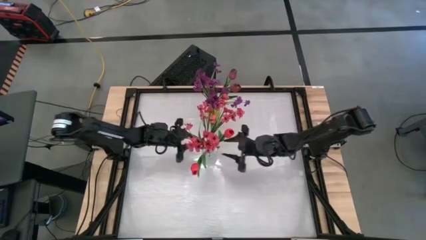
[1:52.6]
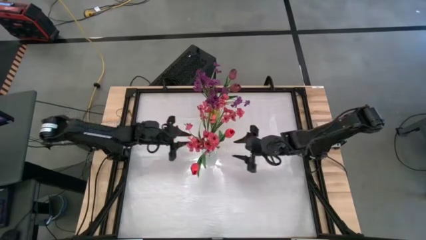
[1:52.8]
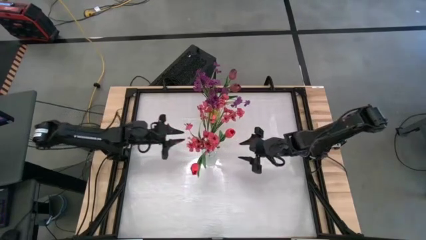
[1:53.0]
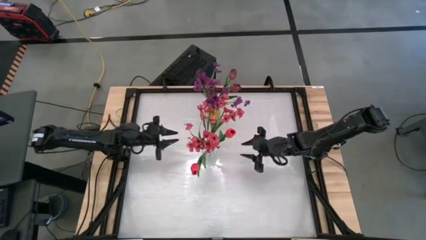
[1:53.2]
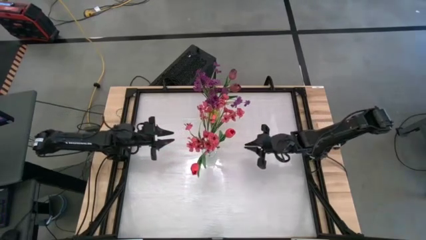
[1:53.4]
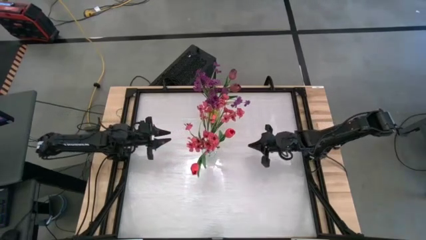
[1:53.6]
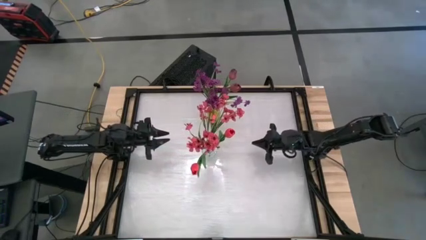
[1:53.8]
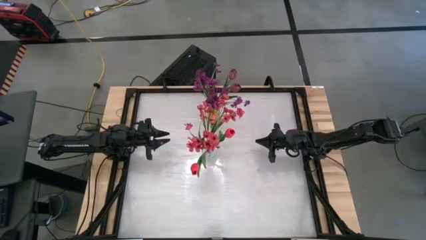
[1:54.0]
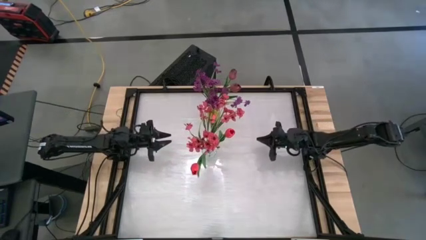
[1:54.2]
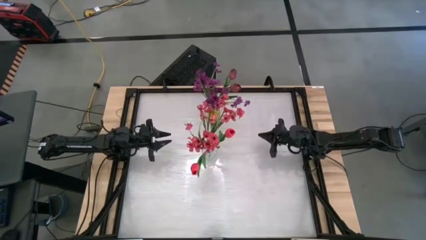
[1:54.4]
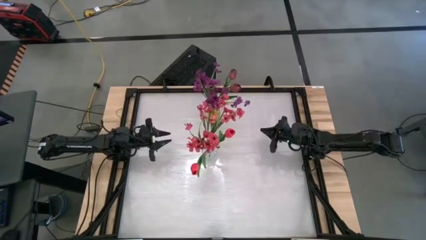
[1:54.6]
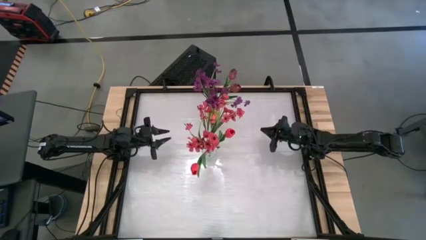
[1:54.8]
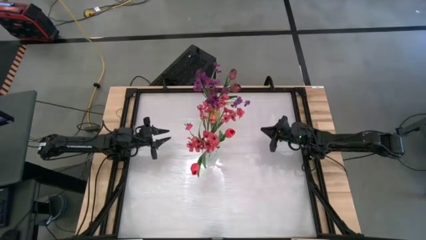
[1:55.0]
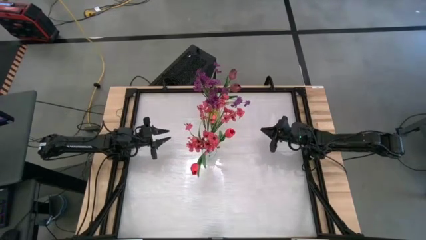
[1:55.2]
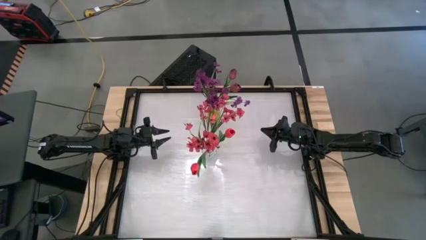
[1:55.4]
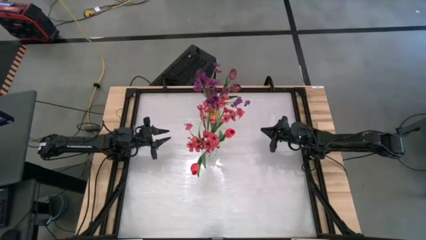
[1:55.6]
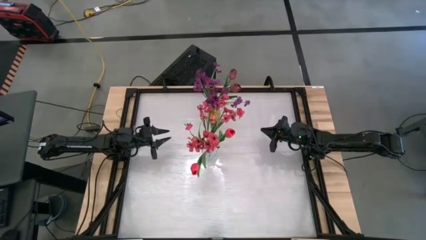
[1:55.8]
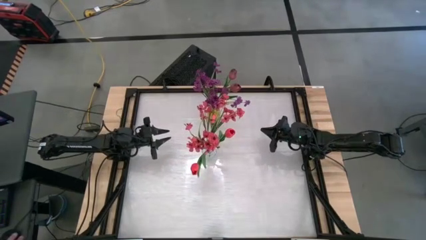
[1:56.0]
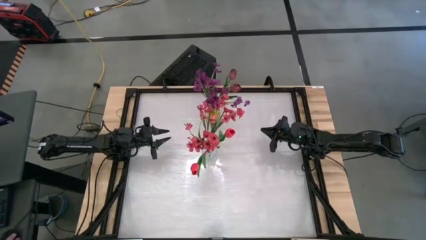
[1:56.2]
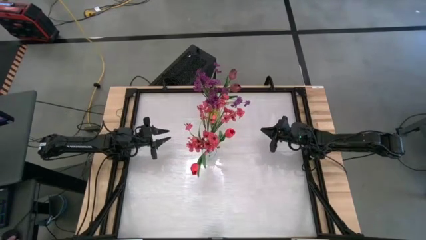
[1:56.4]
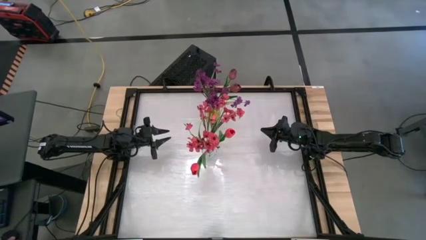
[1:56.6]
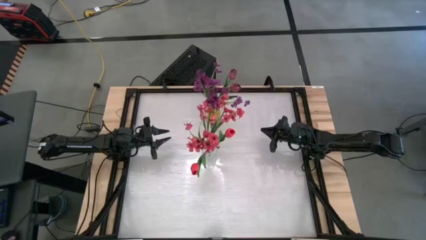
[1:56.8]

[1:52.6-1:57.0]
Task: Sort flowers into vase by color
Return to Home Position

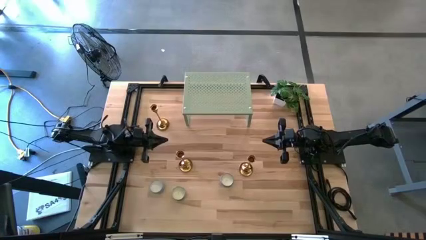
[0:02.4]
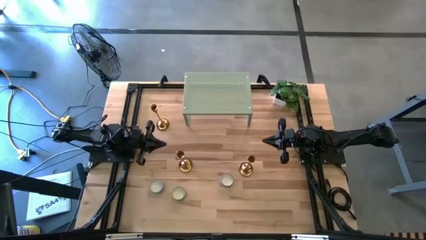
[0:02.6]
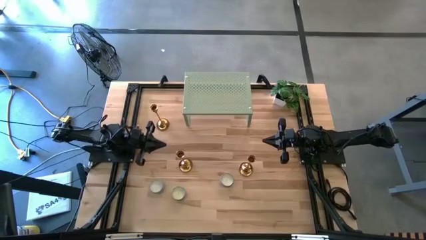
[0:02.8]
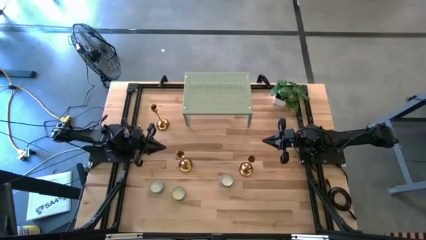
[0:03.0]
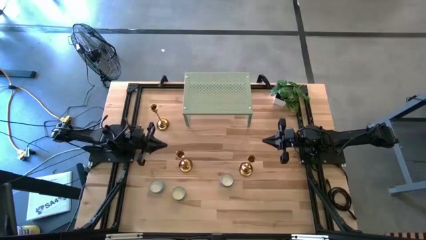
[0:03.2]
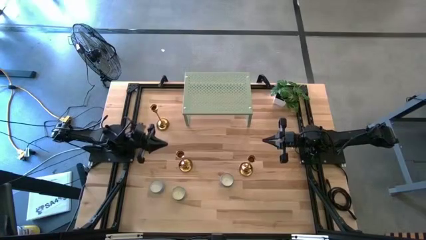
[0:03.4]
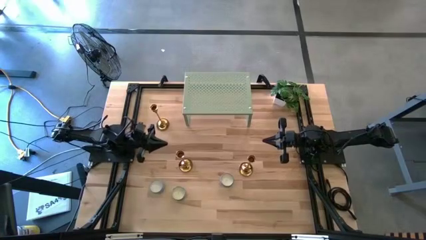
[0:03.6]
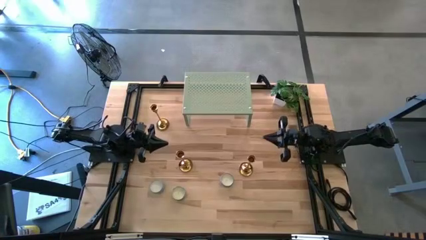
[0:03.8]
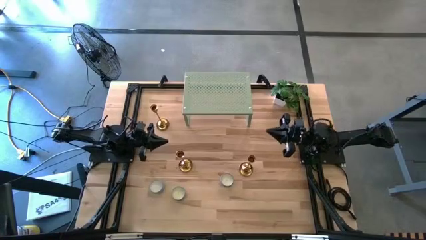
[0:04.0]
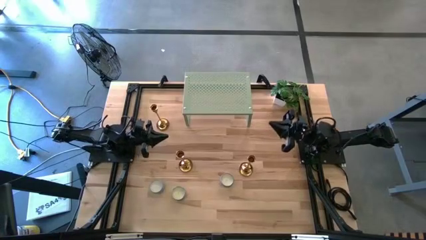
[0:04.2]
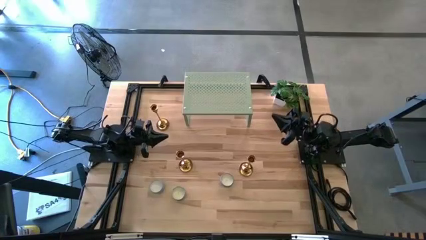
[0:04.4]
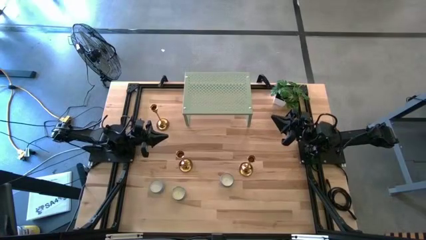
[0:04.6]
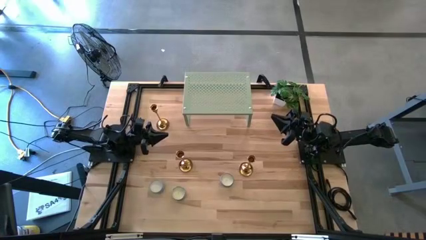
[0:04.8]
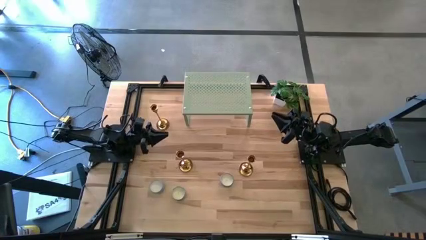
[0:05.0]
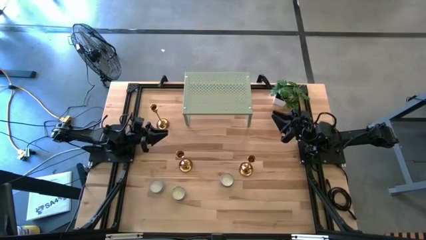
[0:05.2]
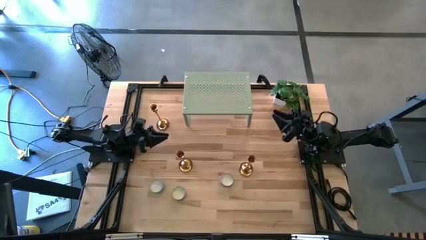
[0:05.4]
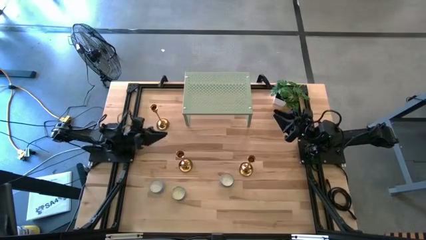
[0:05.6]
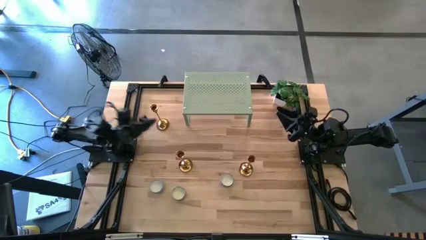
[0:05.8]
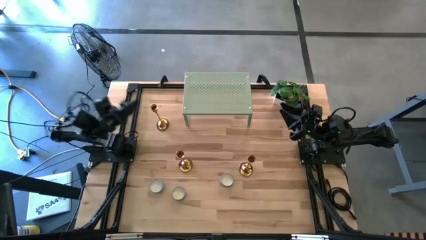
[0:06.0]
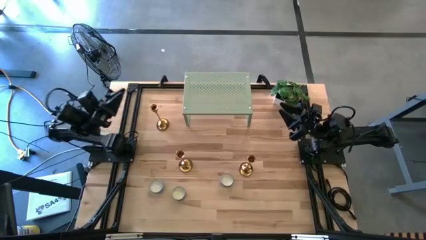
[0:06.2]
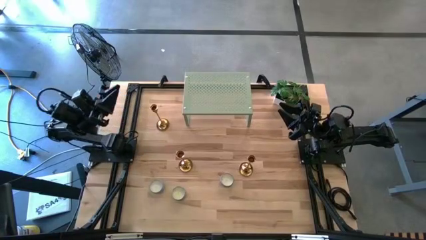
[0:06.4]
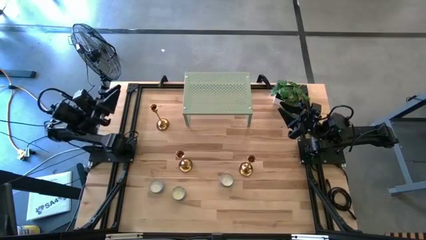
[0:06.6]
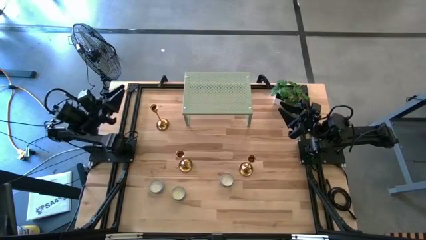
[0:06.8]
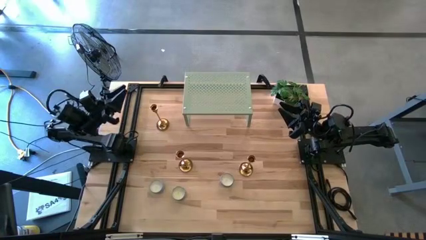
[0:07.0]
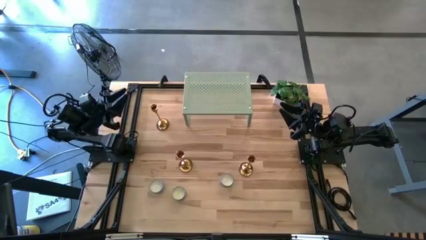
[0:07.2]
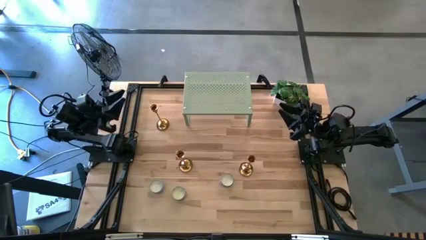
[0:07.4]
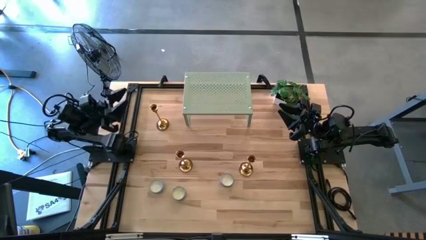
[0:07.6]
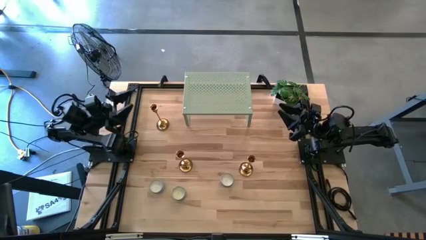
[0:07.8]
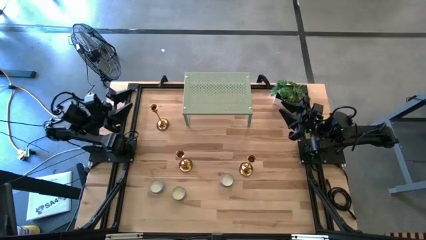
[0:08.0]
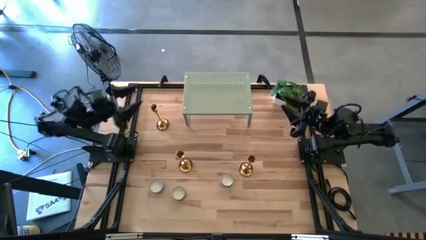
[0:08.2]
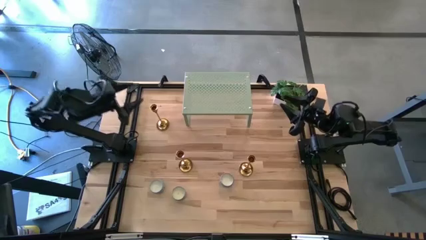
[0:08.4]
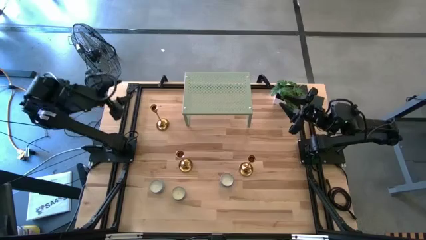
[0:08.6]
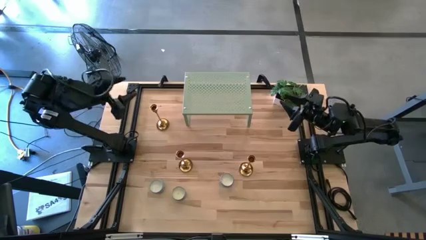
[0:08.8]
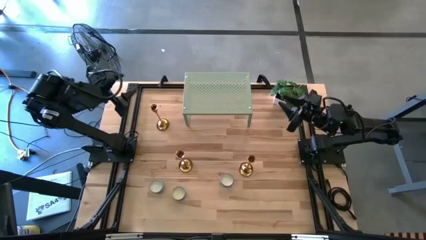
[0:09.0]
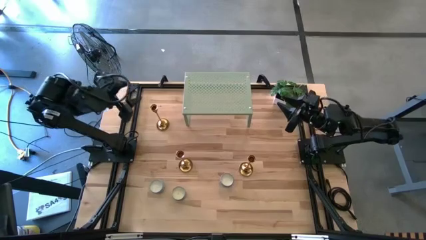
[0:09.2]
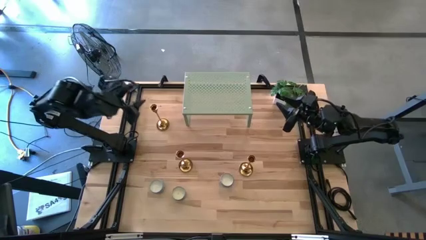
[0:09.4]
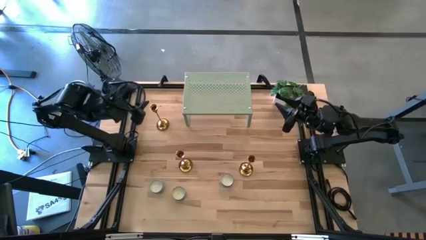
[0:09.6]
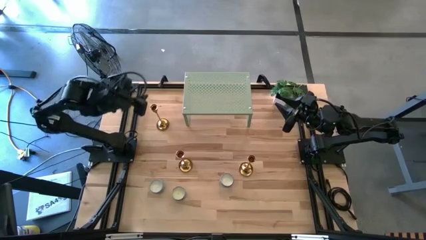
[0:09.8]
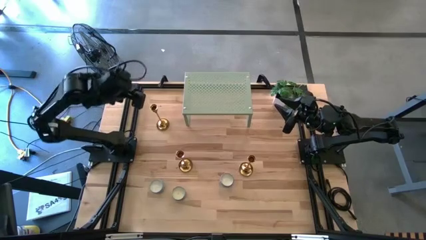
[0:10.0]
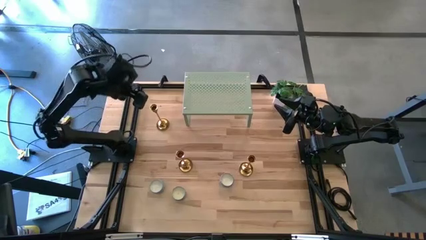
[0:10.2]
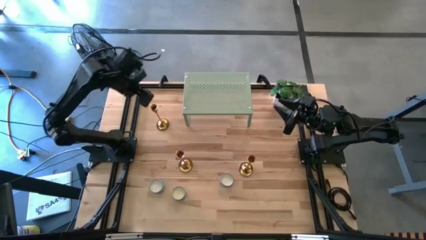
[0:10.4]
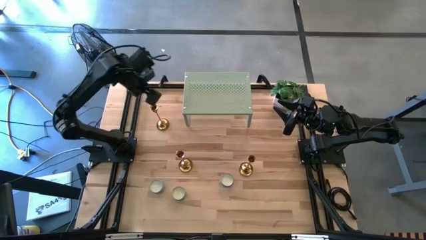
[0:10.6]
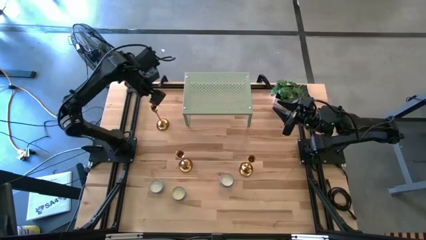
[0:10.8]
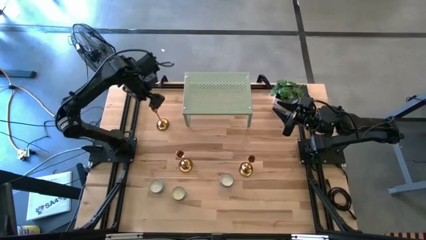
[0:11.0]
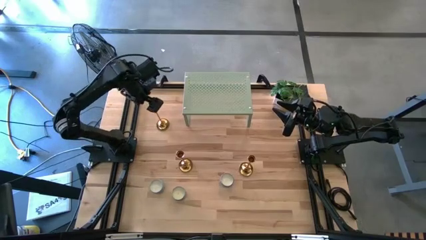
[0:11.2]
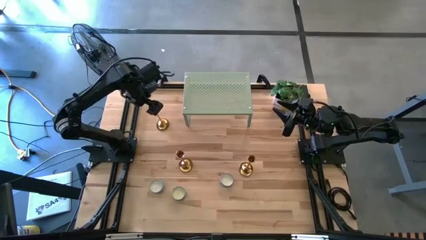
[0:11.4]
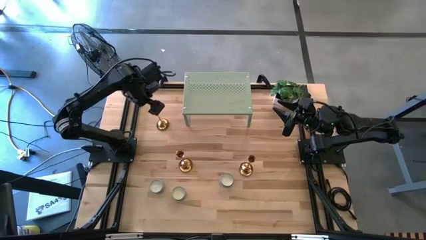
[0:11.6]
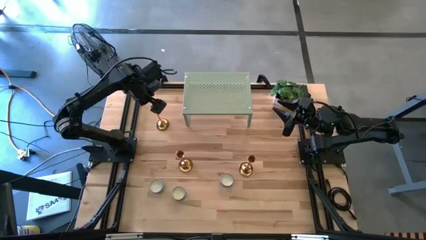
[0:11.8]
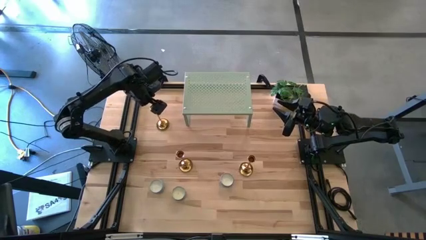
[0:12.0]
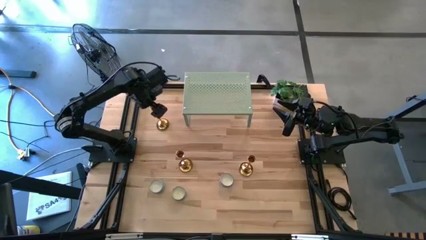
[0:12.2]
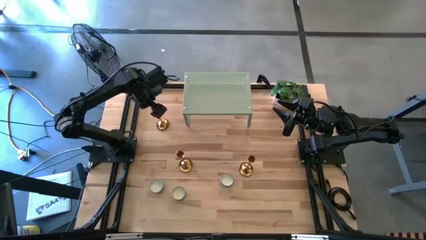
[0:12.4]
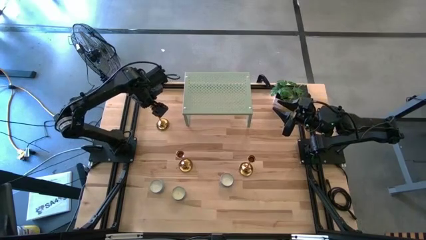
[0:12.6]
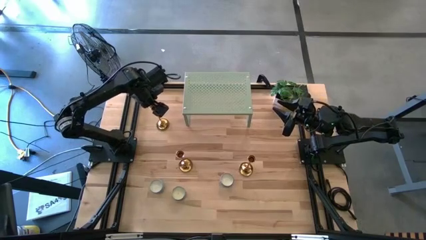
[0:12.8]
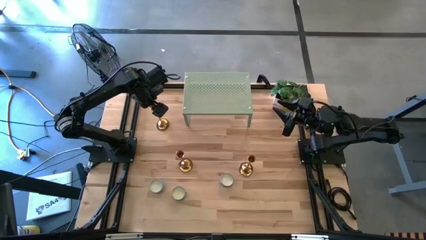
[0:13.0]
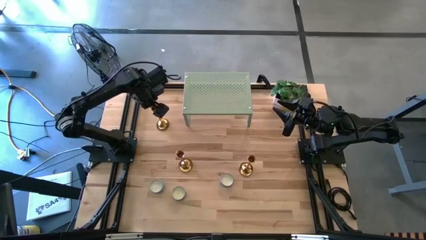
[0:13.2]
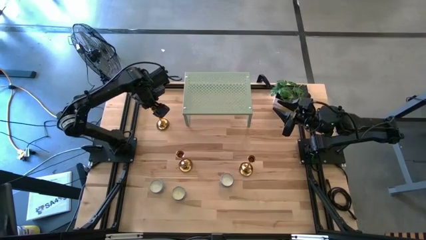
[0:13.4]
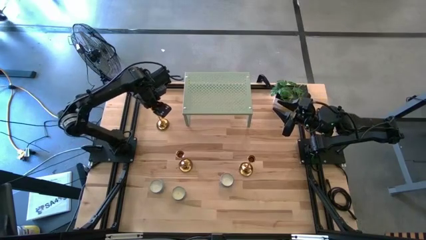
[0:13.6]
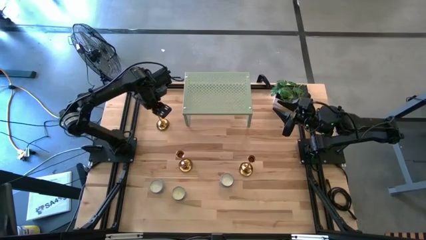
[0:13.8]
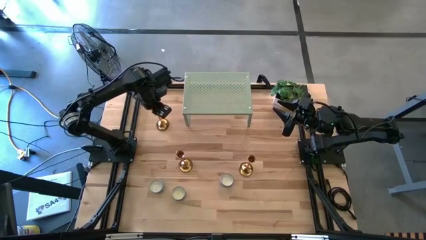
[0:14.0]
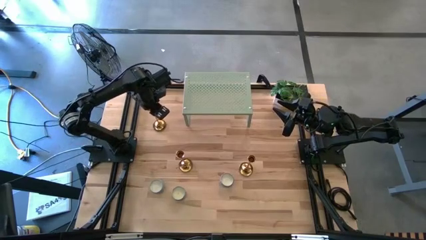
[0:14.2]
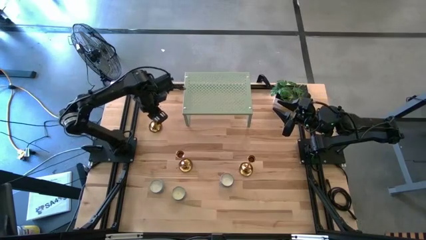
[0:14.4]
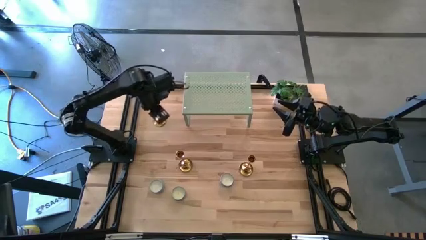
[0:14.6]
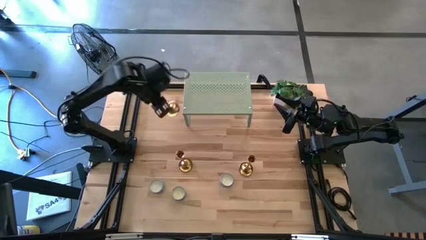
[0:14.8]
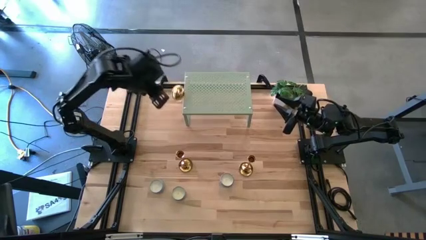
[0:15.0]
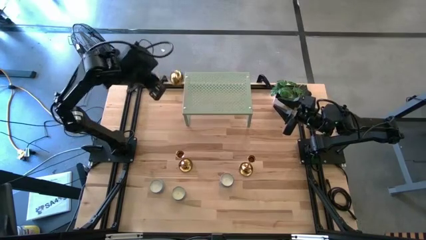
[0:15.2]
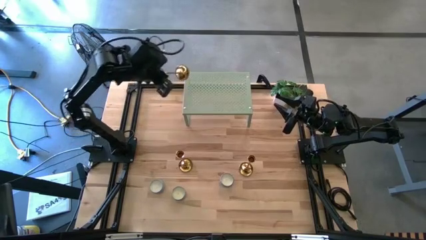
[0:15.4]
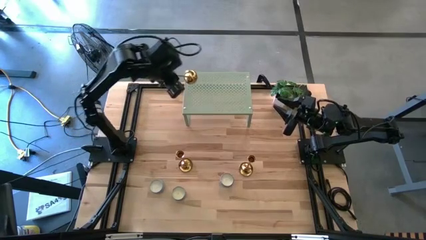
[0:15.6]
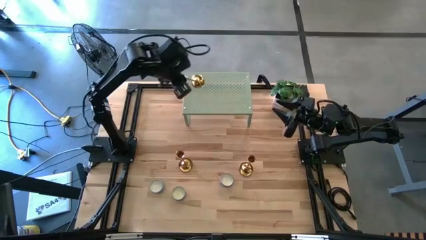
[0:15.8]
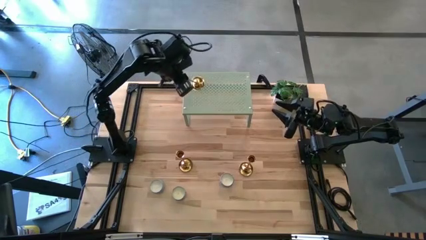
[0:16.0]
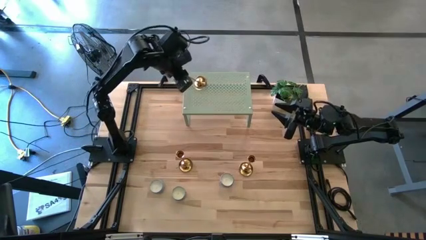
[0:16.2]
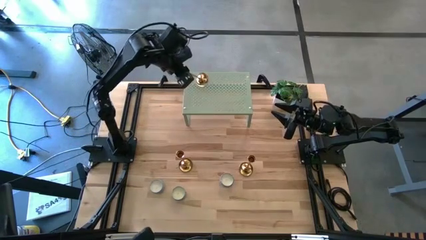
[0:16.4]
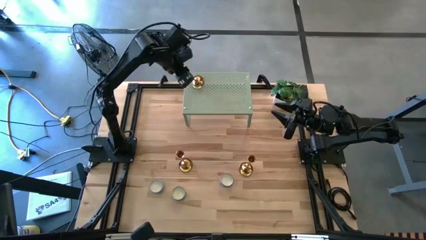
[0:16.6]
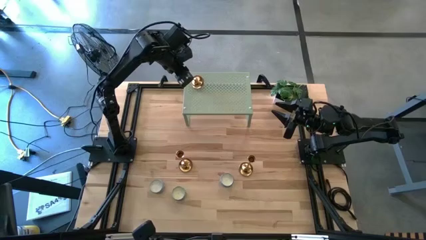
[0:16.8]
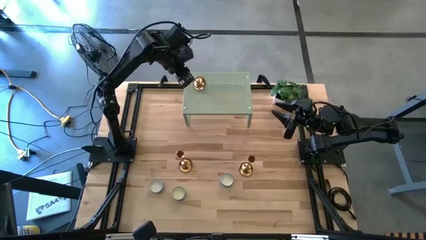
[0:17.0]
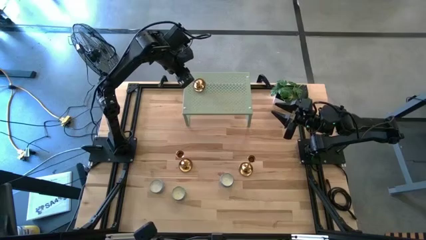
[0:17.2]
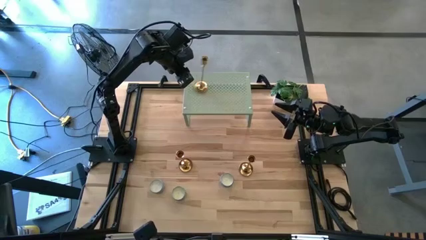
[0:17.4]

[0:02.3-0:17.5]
Task: Pick & Place candle stick holders
Put the top gold candle holder on the shelf
